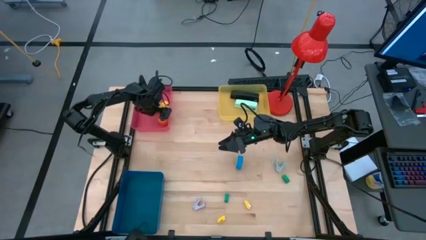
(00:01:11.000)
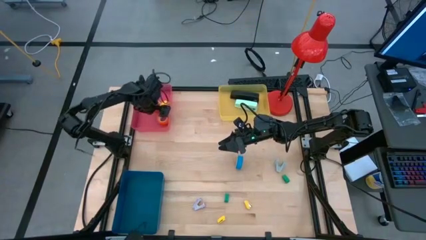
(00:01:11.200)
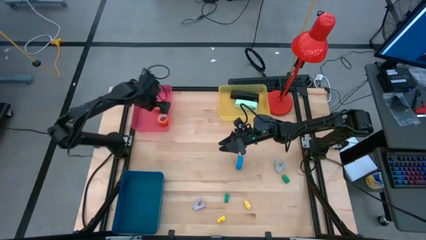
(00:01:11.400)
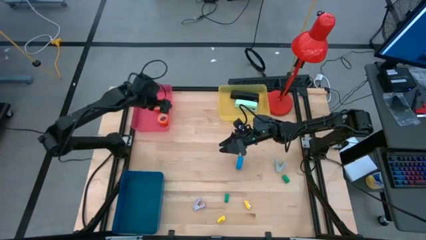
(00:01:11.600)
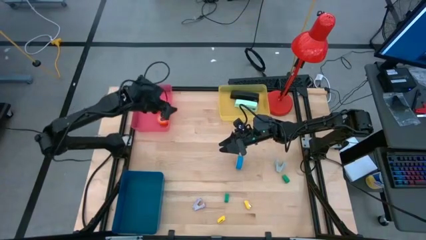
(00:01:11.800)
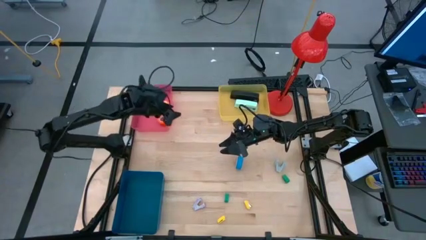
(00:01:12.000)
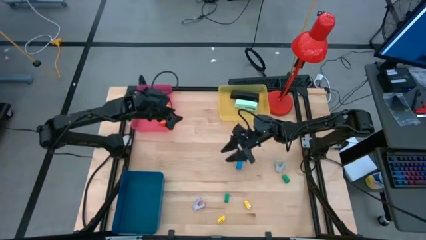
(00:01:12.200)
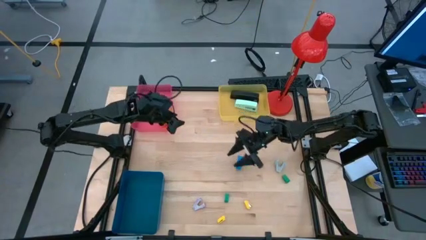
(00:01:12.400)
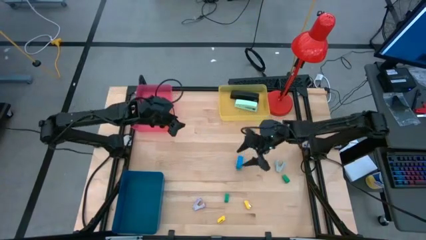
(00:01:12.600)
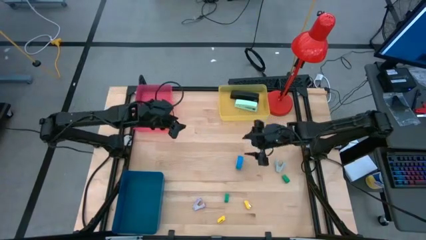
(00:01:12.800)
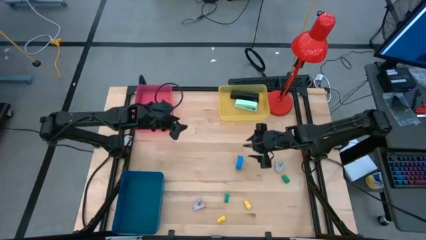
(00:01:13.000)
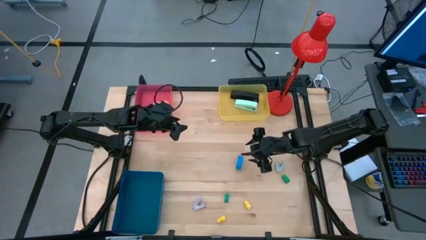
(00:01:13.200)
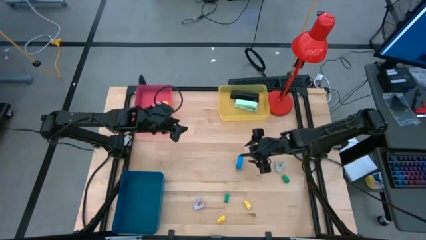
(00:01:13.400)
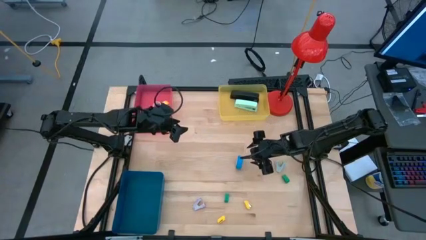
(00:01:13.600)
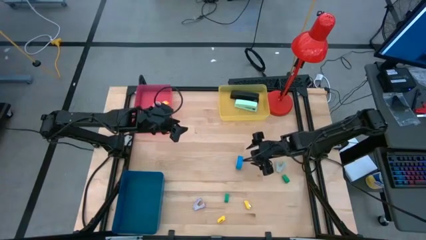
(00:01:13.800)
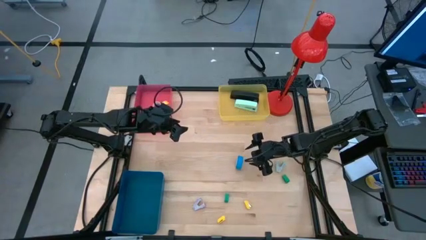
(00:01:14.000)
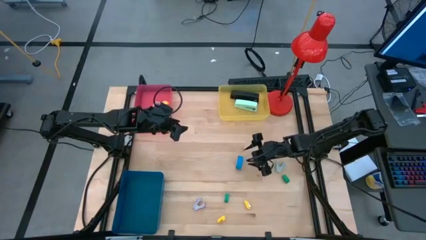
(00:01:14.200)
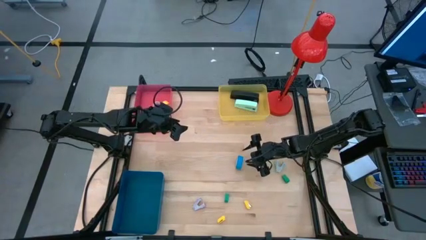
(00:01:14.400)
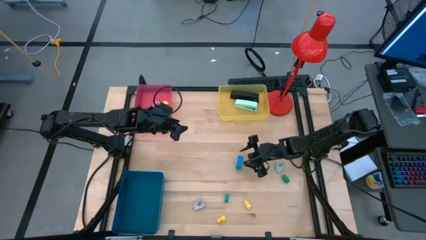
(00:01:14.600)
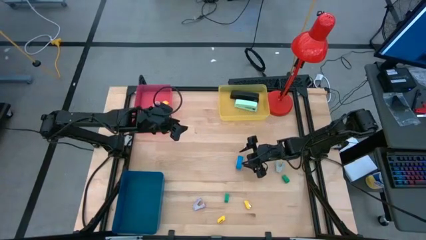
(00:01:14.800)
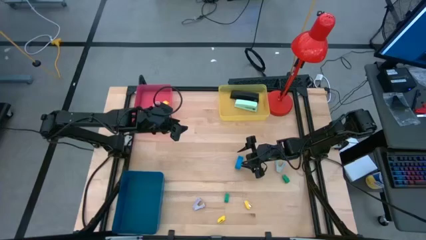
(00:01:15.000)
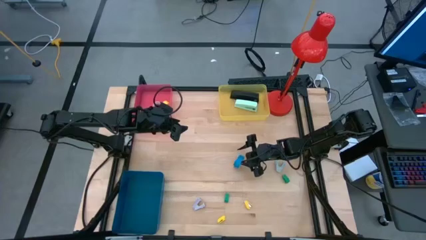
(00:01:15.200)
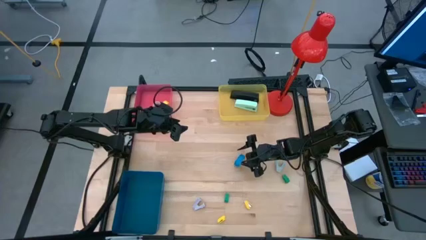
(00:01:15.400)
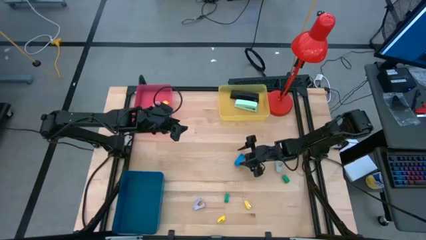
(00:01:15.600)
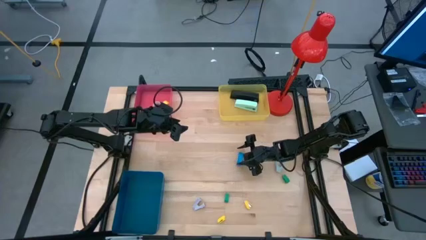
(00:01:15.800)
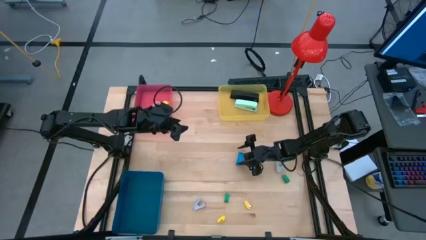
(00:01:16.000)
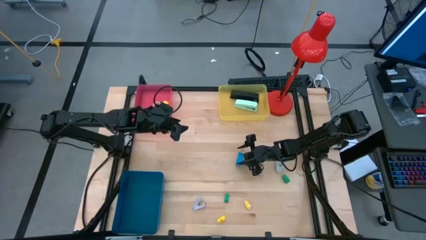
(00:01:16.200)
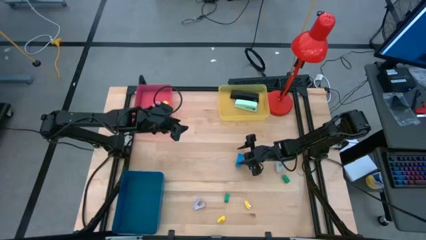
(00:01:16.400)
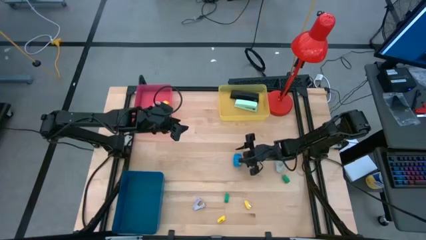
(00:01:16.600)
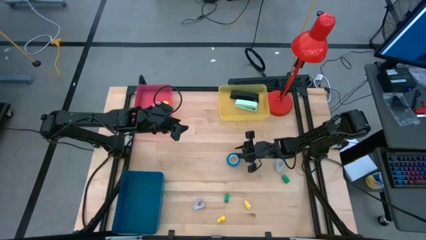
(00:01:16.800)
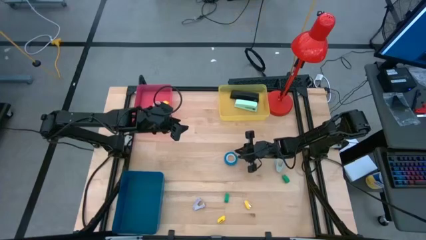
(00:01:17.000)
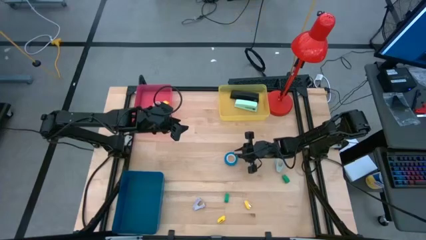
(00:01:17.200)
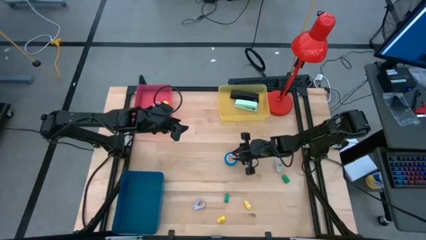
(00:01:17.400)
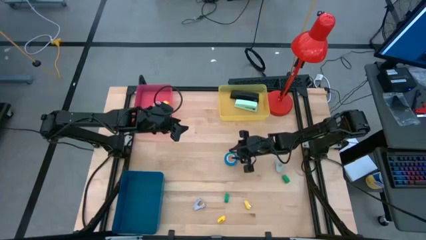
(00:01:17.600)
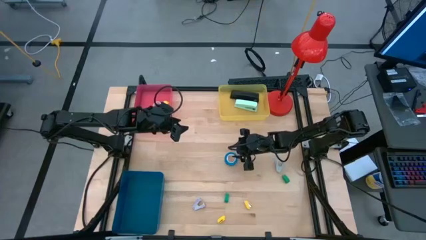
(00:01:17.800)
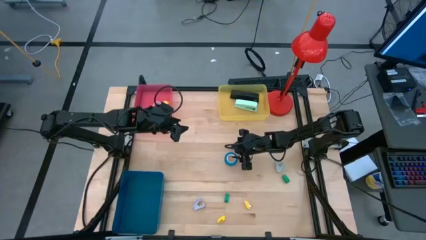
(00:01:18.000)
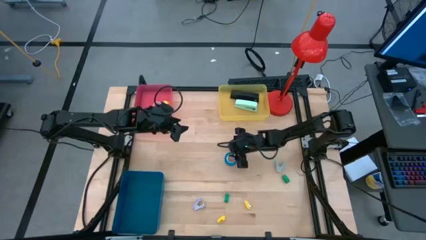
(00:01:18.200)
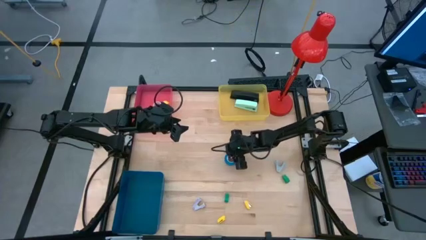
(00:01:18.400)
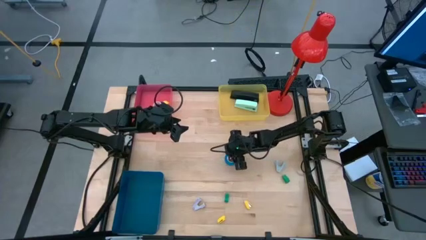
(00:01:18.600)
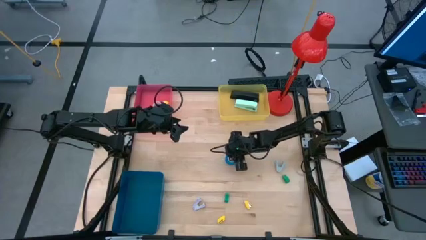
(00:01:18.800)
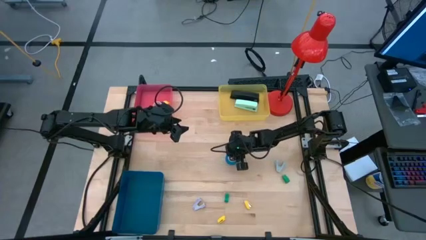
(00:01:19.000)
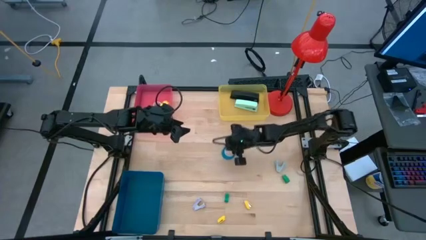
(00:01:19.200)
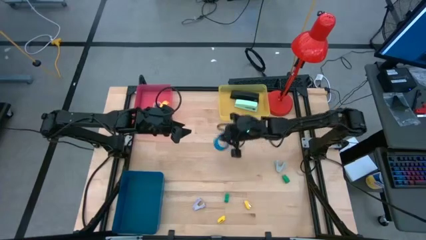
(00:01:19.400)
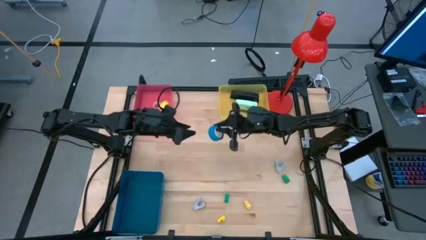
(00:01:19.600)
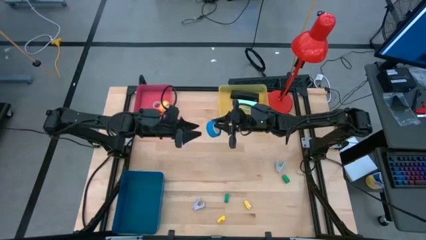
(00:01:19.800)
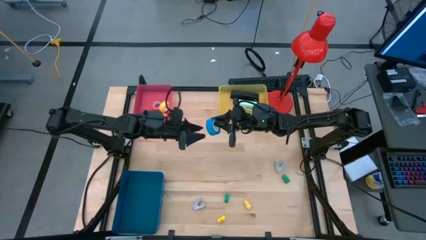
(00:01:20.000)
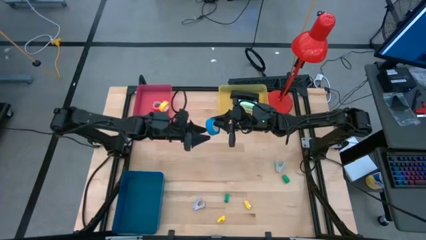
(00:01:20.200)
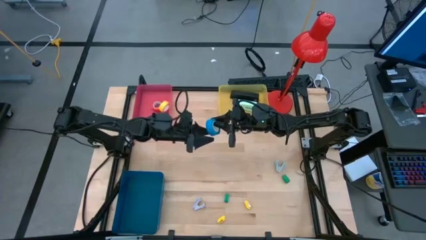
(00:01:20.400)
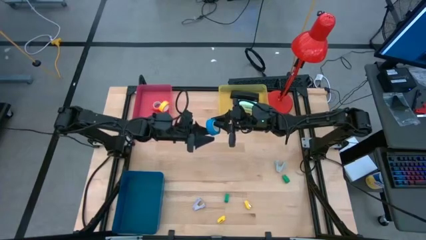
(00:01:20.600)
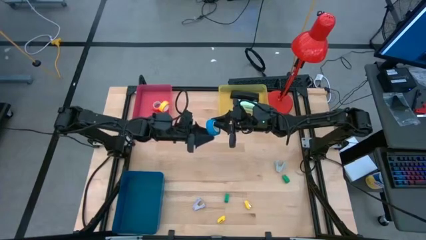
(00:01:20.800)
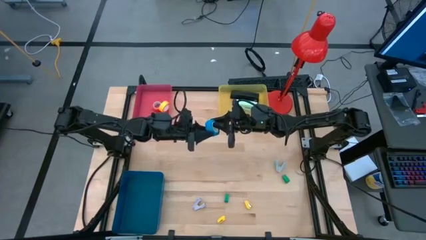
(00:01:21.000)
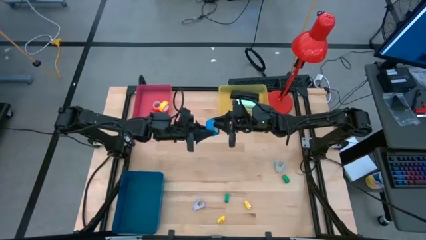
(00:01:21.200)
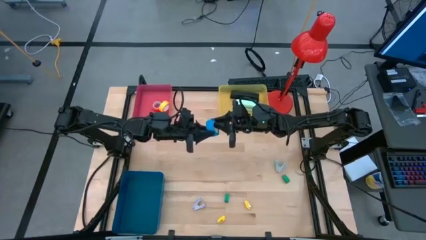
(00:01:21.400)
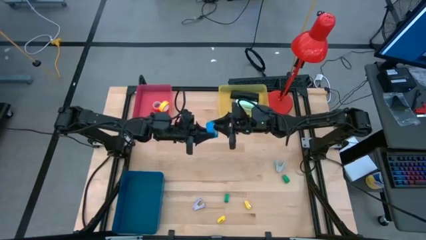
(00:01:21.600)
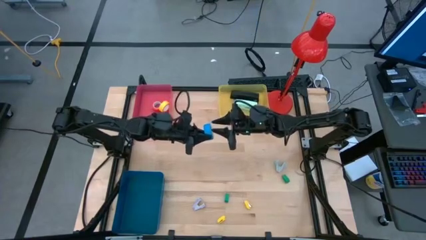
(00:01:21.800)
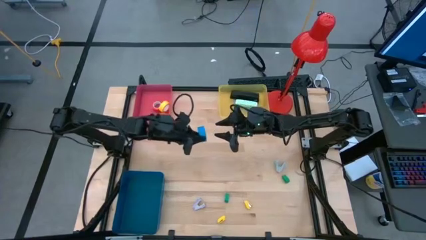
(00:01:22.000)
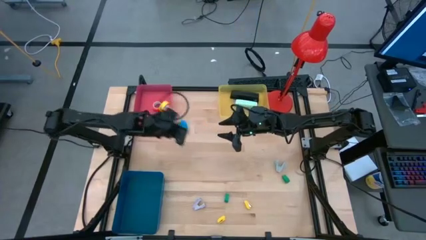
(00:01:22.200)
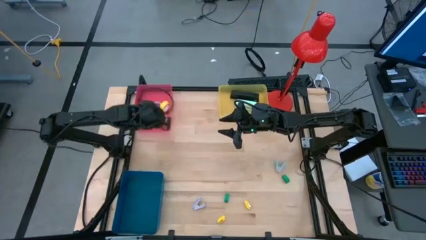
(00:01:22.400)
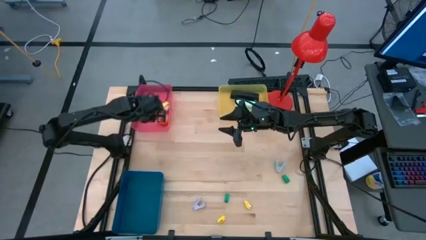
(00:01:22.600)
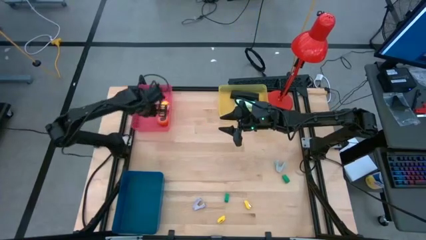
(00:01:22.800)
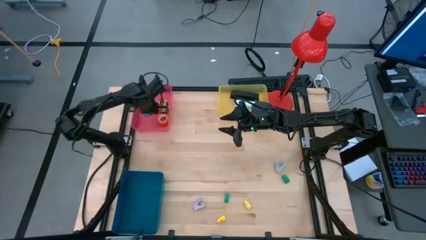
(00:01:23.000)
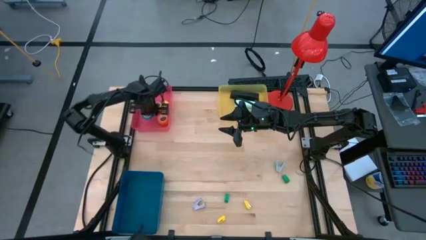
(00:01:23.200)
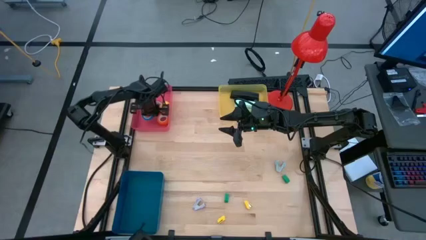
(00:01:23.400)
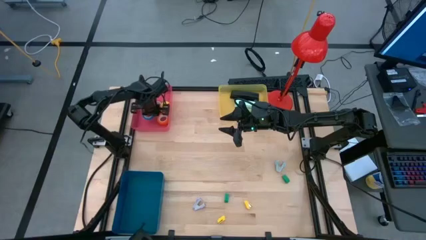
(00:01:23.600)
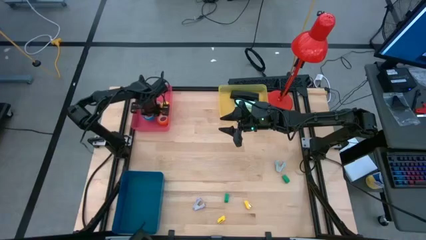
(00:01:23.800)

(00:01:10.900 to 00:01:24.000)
Task: Pick and place Stapler, Stapler remover, tape
Put the blue tape into the pink bin

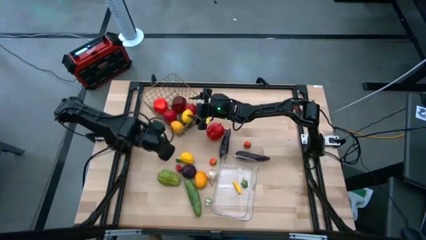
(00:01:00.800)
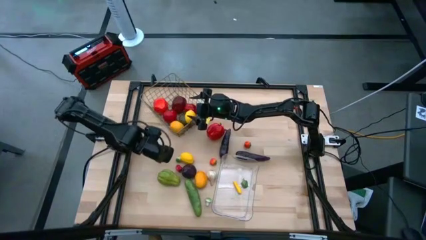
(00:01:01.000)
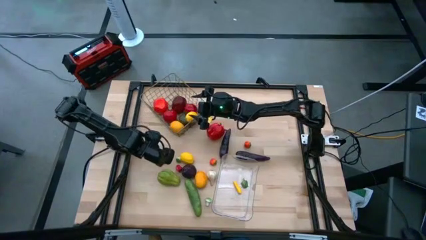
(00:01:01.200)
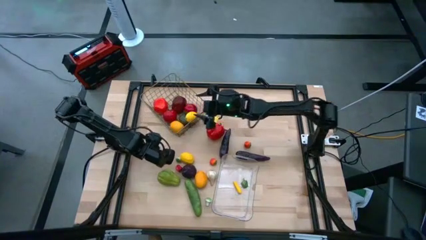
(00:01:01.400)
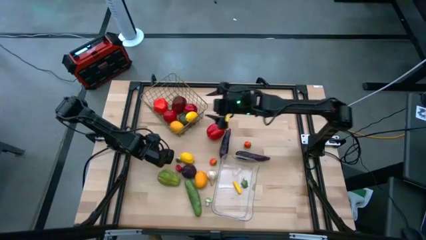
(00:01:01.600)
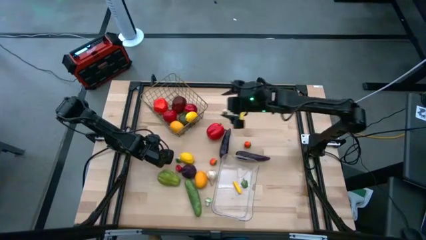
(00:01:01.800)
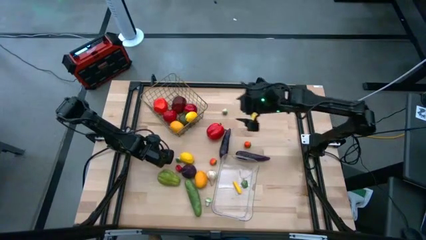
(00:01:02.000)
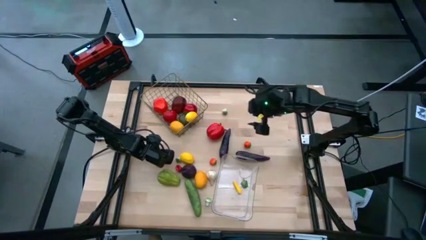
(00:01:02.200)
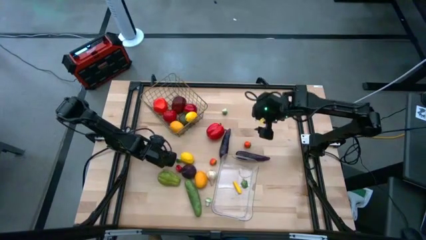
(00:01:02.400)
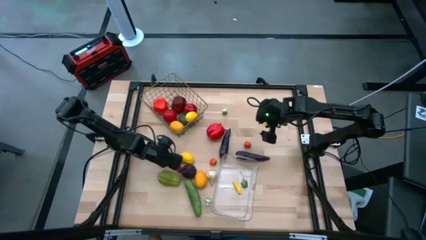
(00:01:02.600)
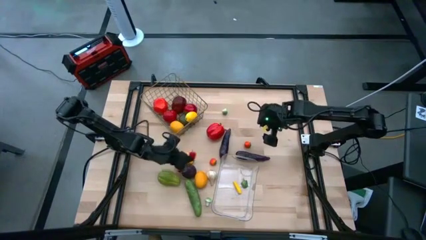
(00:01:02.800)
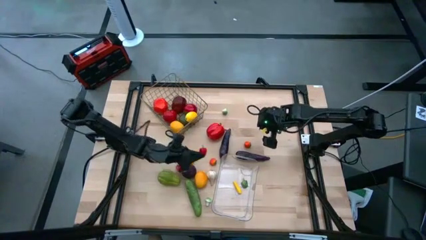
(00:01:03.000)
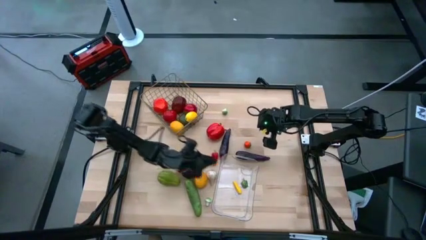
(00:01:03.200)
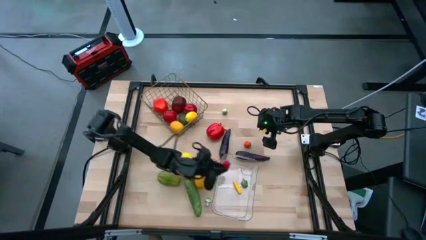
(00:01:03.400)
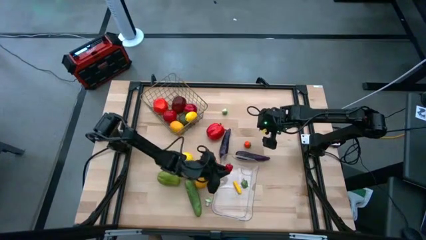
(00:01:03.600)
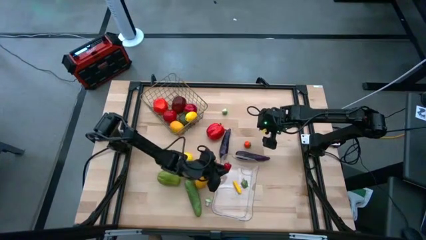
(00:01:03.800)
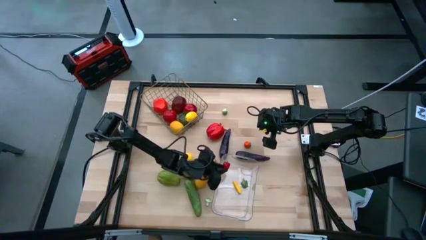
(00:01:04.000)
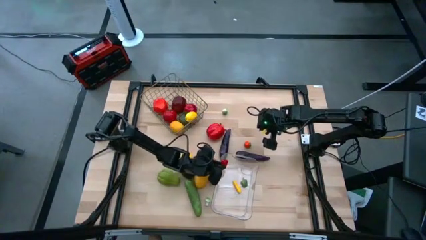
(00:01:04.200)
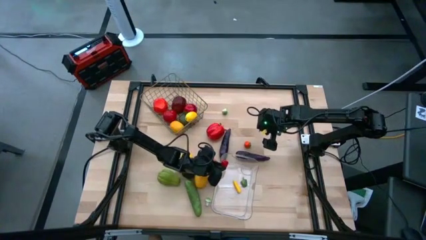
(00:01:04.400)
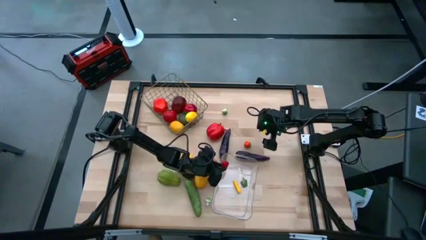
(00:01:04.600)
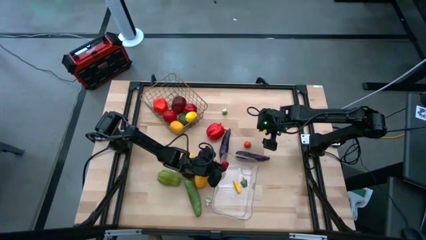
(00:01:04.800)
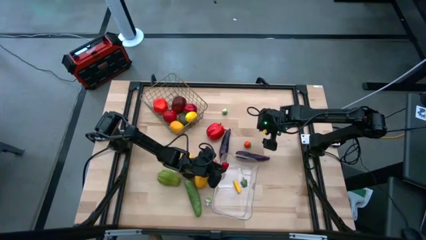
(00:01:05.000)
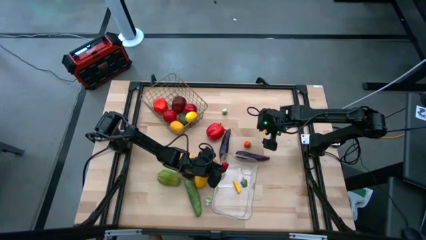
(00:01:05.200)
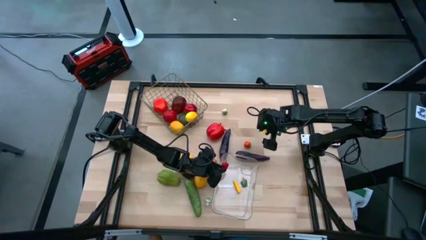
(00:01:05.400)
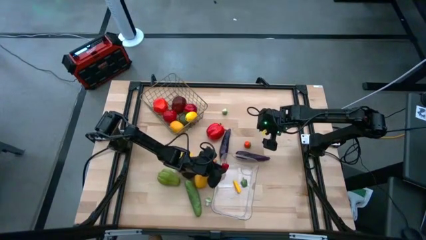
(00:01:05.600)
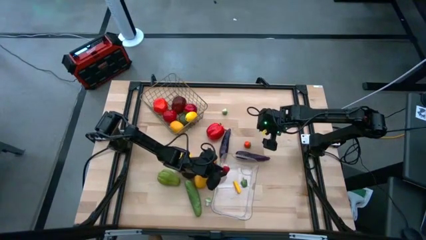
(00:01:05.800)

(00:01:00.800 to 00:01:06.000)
Task: Sort produce into baskets
Put the red chili pepper into the transparent bin
